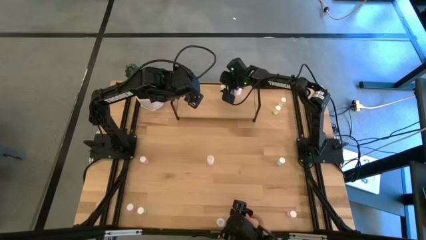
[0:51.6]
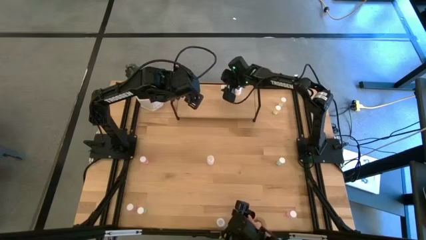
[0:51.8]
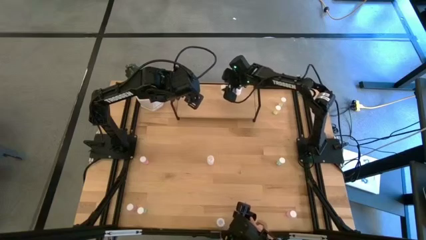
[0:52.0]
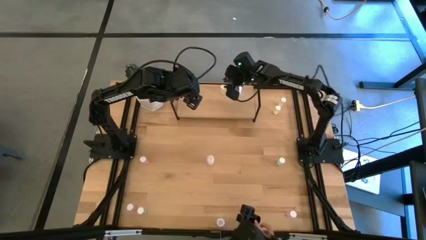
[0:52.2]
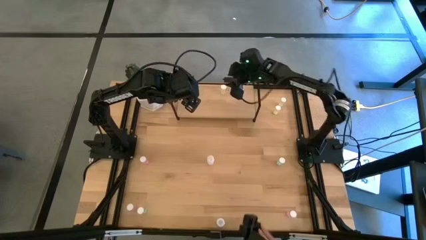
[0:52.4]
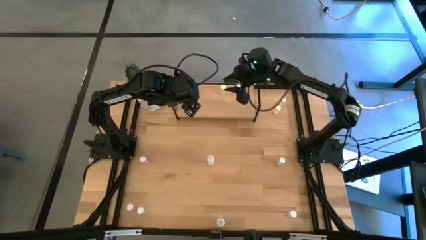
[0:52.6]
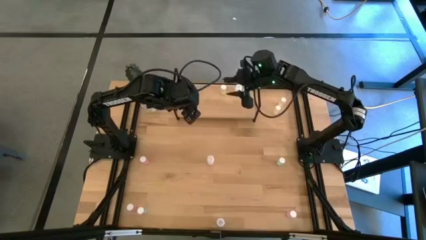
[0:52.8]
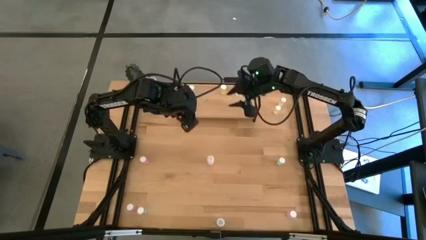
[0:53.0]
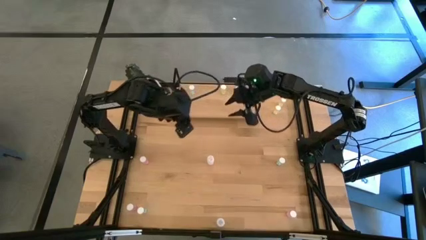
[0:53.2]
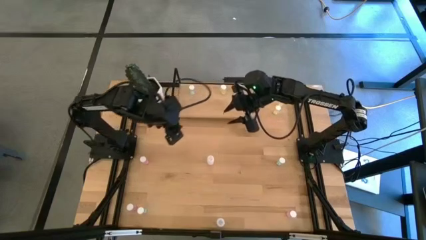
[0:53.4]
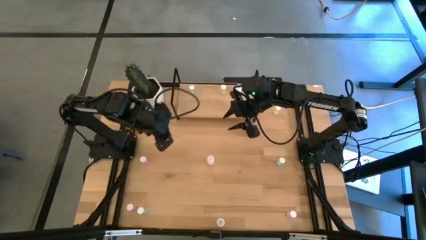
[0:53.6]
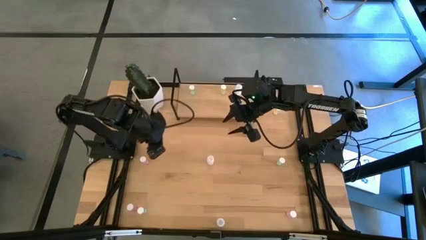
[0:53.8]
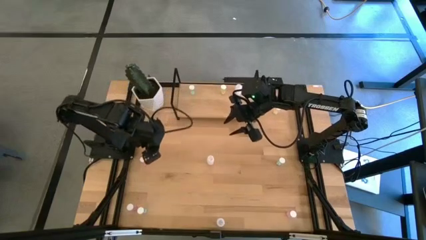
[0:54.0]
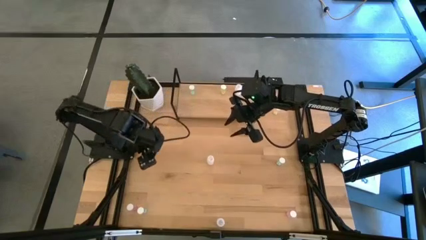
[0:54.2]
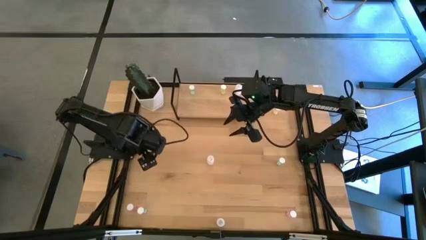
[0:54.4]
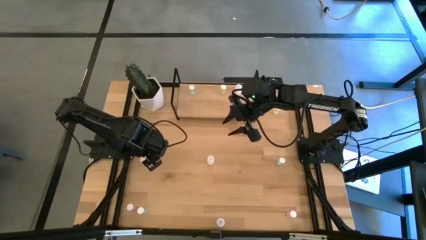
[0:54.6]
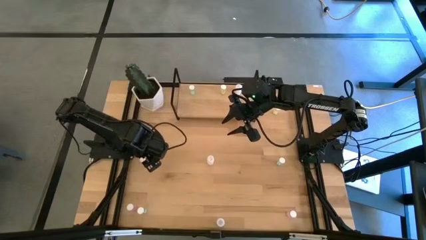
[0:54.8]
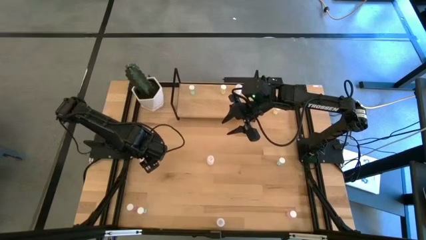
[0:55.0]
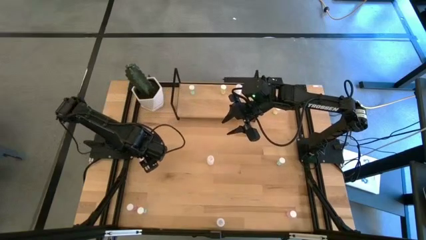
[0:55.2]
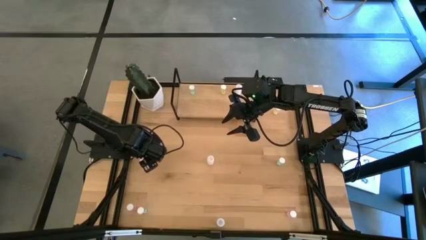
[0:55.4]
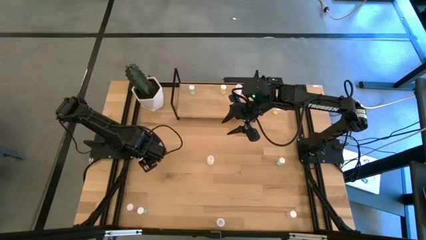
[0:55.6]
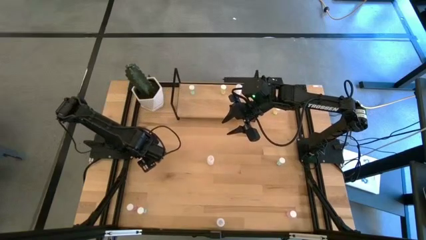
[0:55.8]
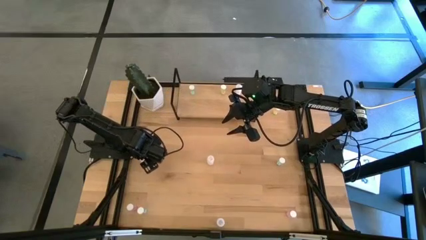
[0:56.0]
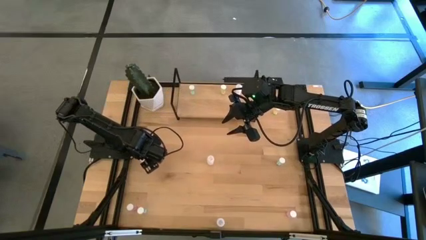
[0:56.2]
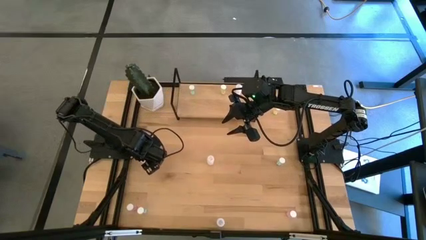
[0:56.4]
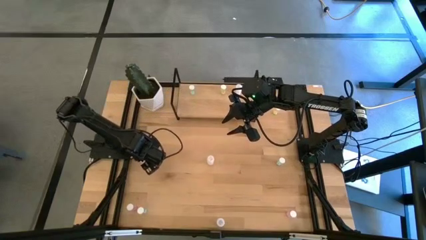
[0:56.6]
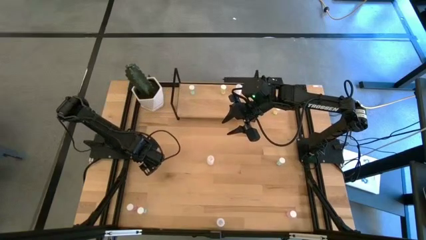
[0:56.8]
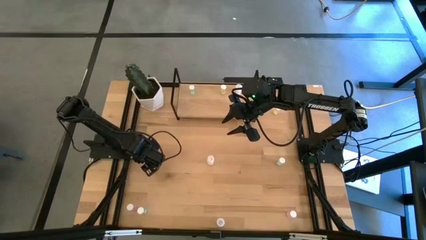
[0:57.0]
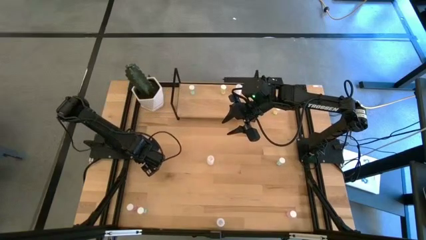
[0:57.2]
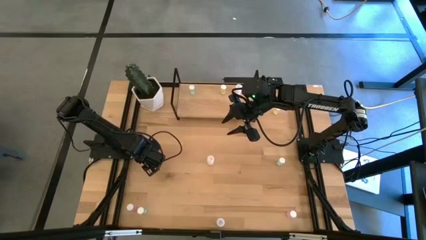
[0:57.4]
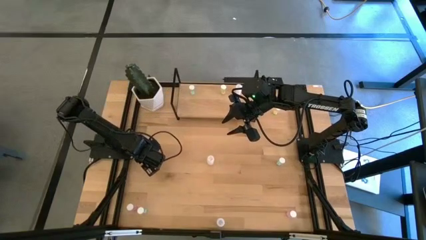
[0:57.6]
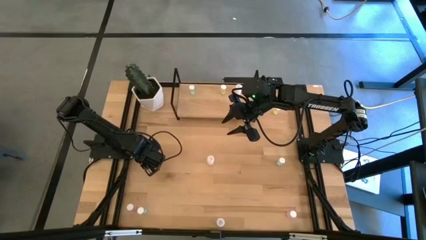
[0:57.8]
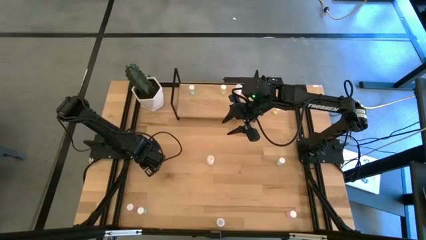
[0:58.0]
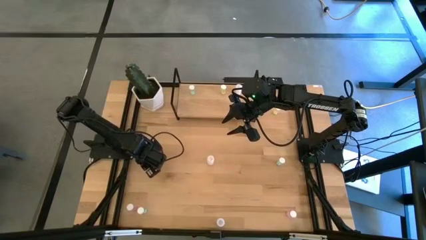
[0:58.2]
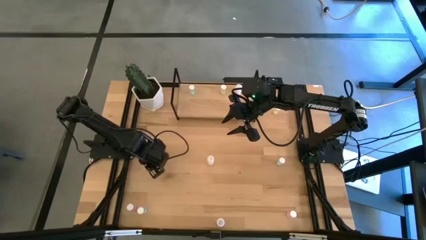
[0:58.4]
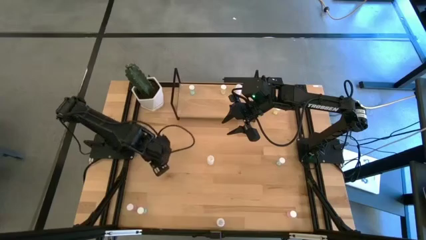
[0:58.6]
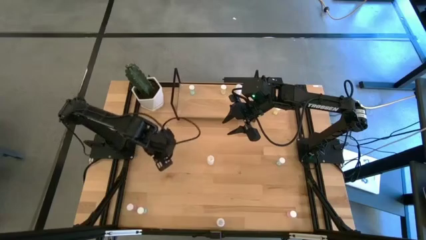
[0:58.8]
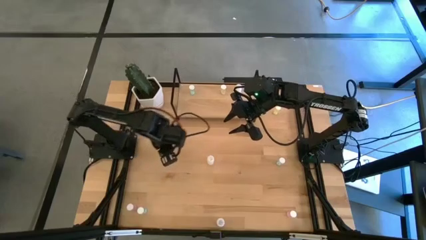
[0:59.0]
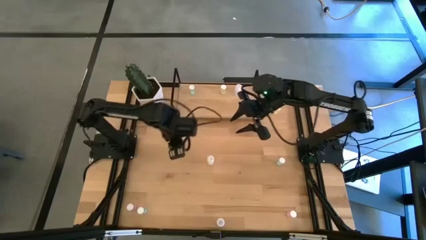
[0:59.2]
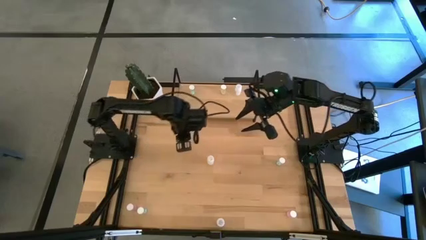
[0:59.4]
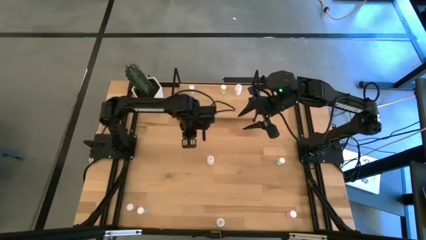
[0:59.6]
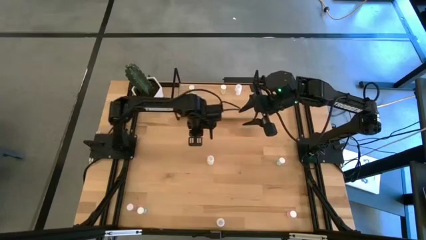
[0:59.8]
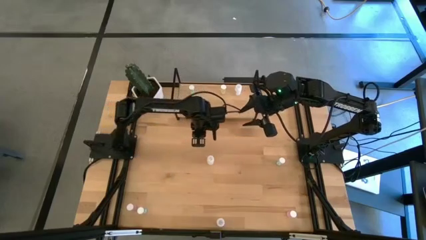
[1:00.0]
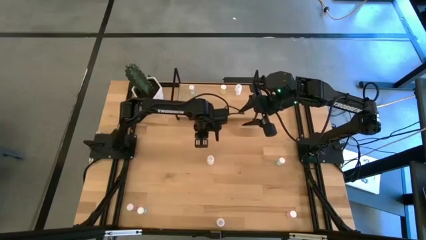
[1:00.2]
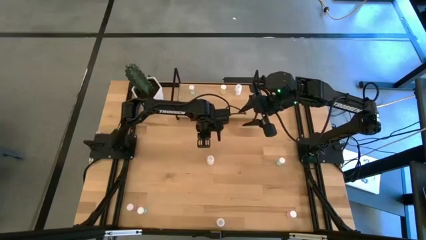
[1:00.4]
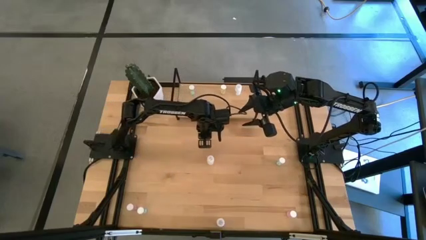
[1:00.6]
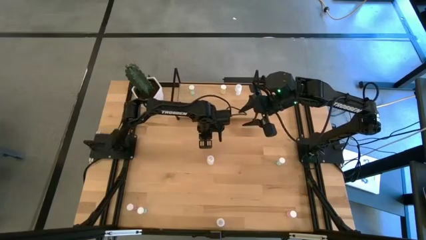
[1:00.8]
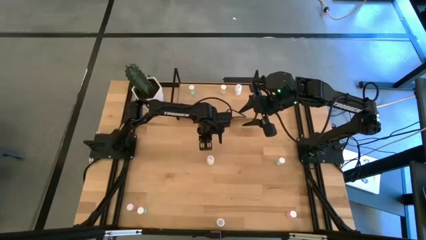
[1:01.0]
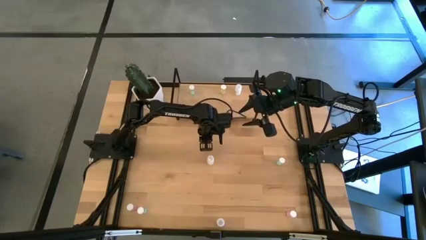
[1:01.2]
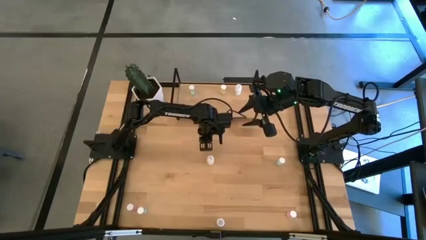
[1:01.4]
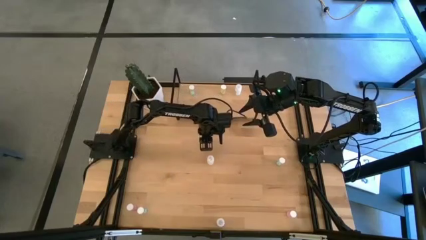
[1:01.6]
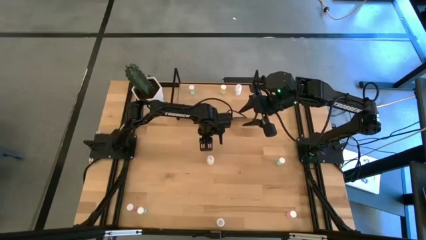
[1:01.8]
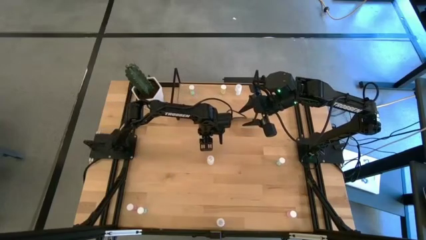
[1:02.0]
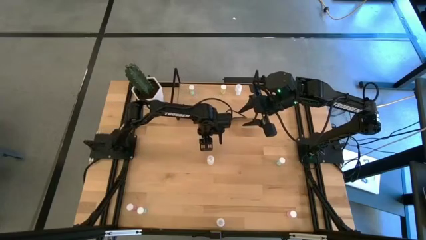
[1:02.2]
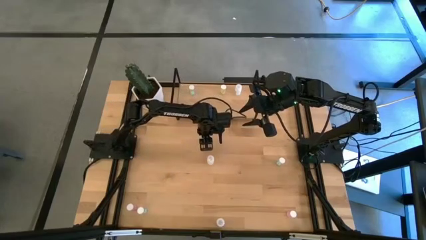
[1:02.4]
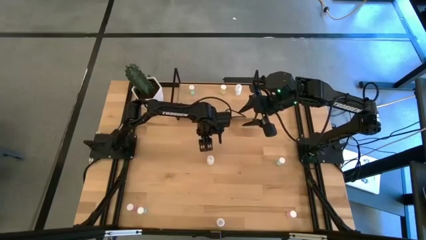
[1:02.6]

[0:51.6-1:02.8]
Task: Pick and place medicine bottles onto shelf by color
Put the top left pink pill bottle on the shelf
